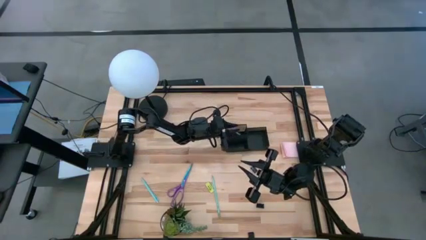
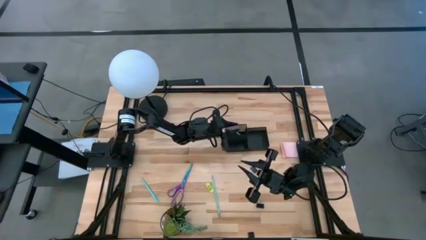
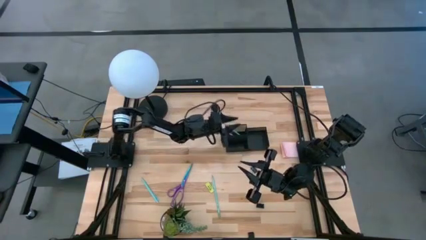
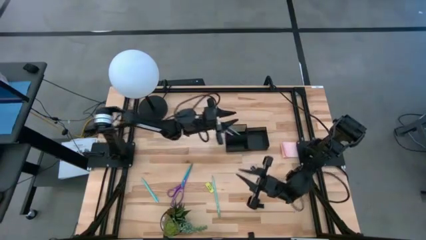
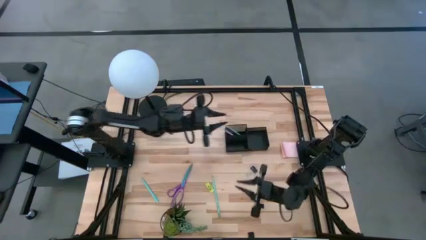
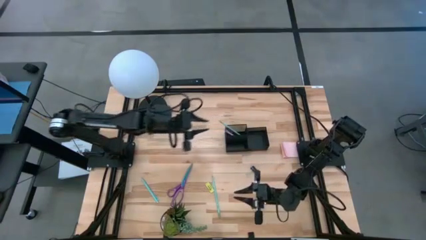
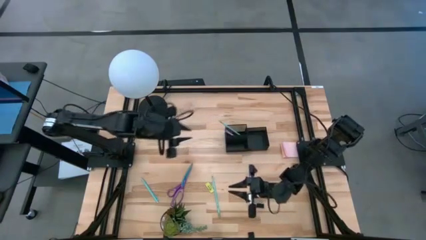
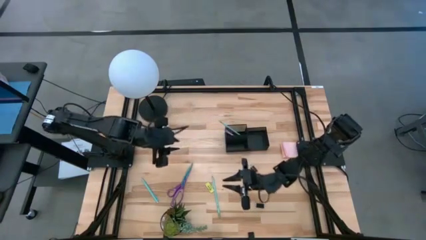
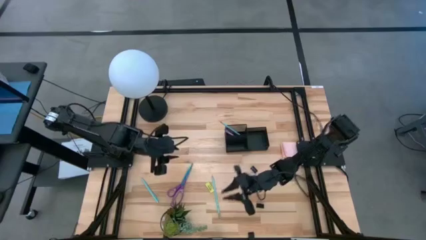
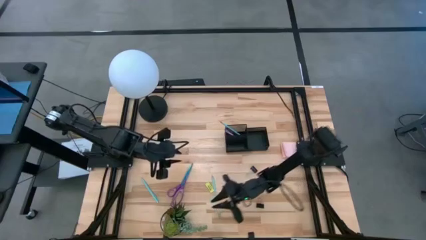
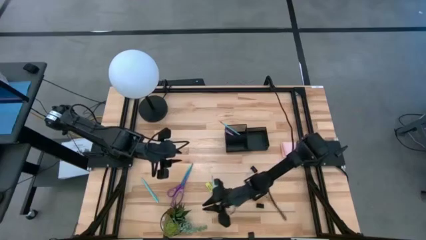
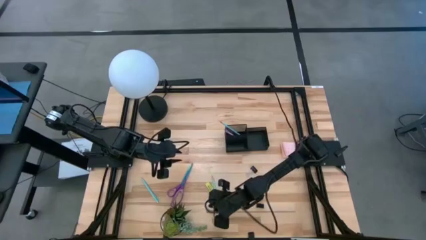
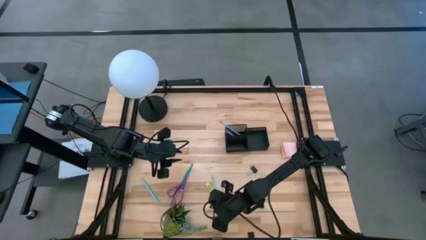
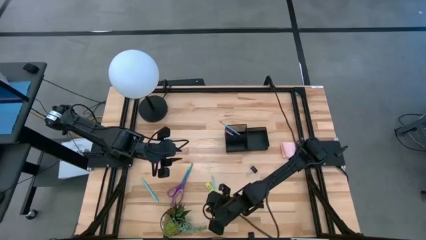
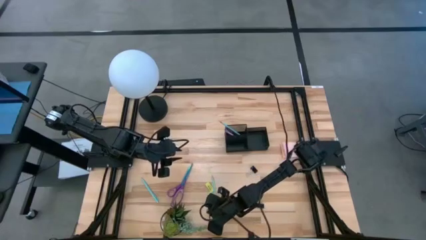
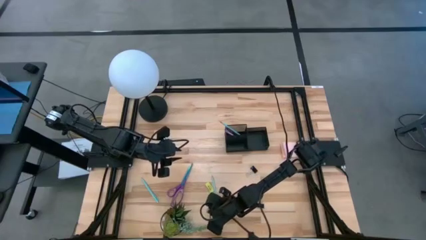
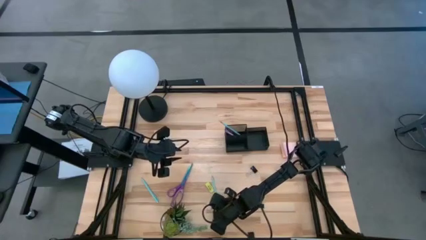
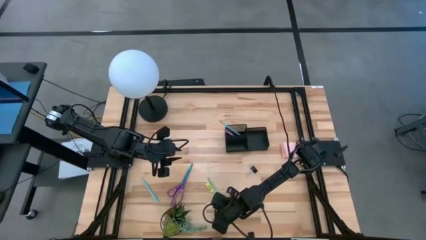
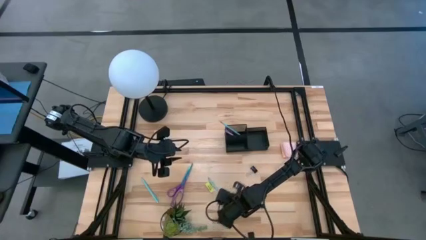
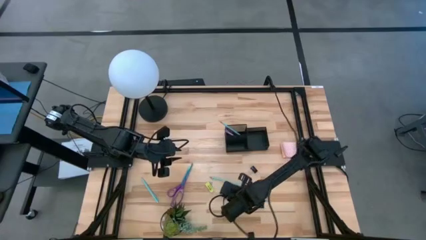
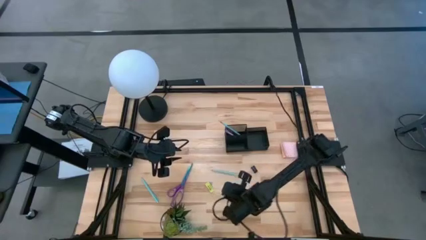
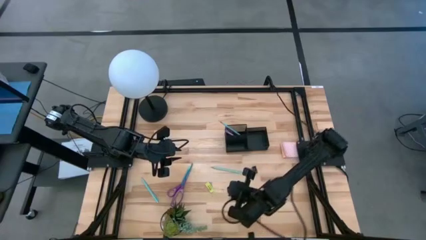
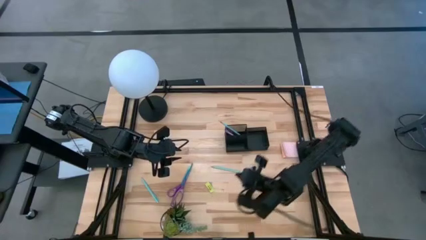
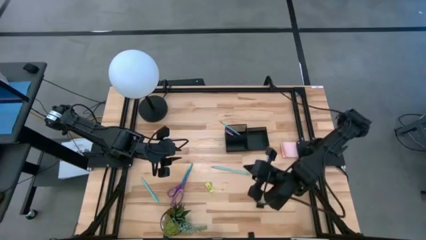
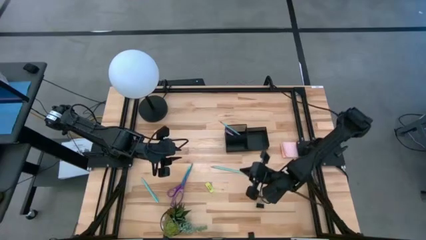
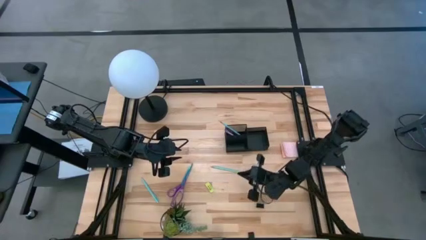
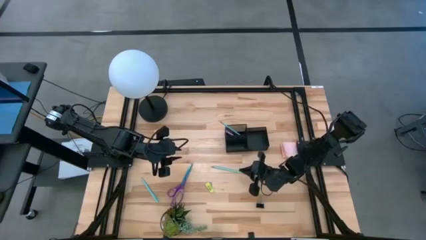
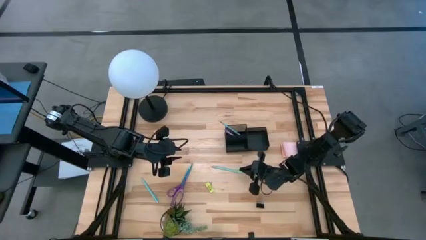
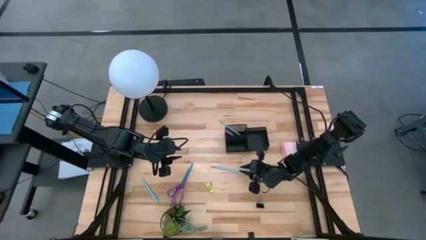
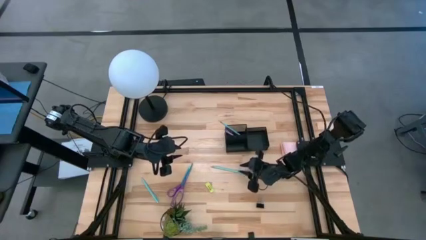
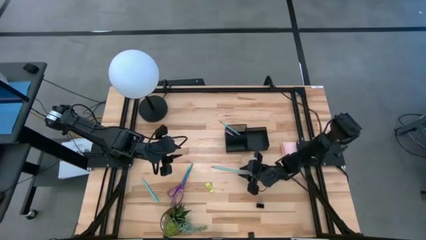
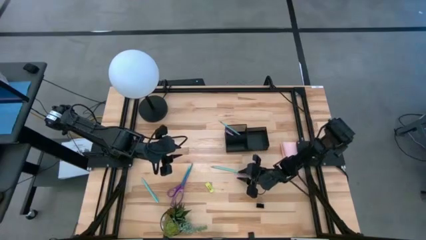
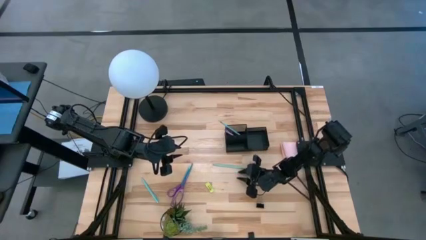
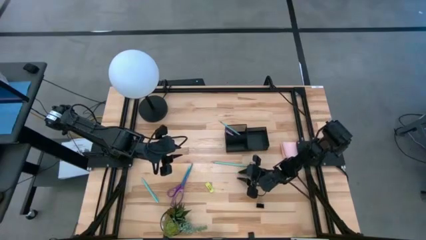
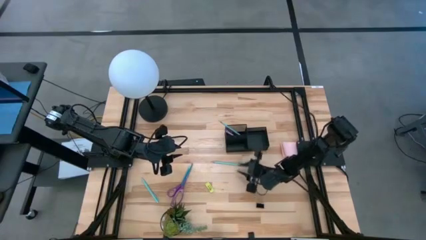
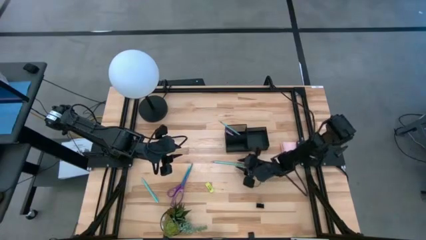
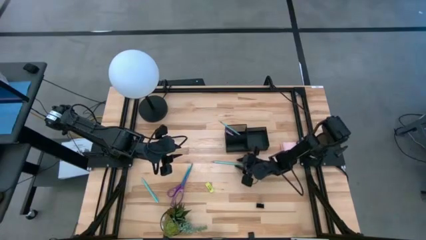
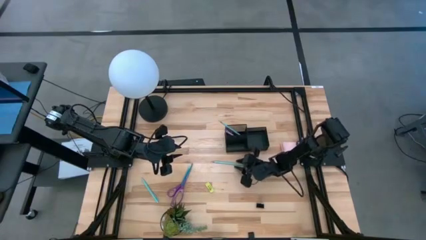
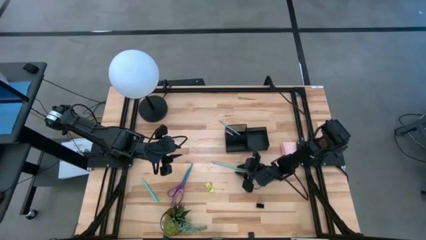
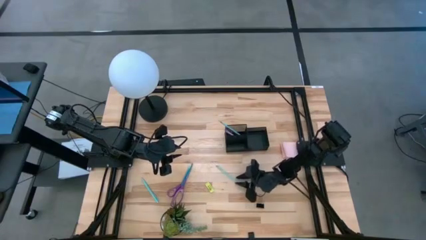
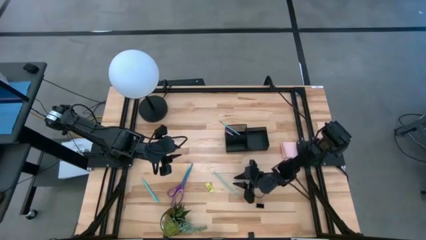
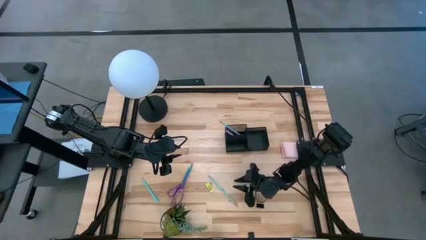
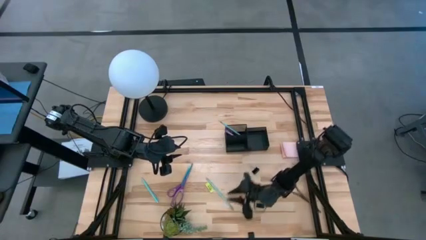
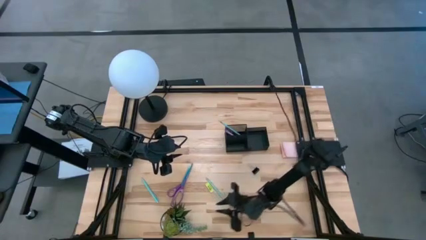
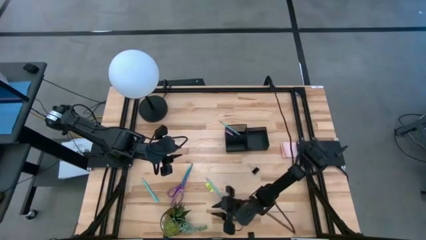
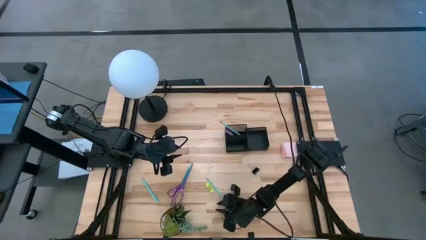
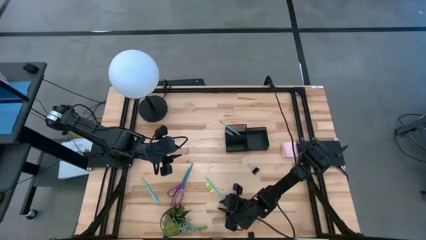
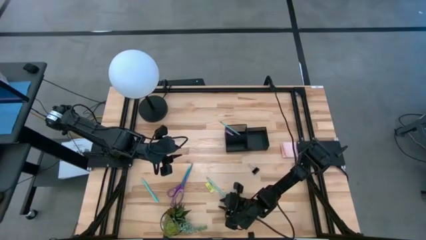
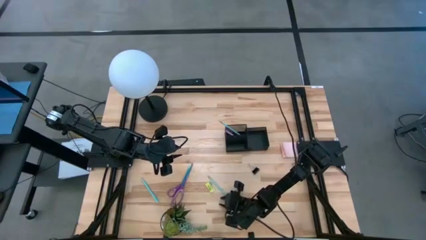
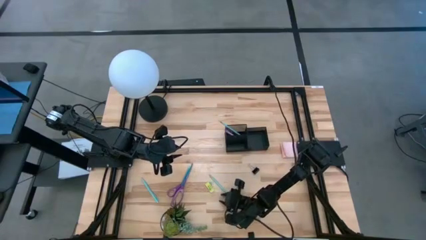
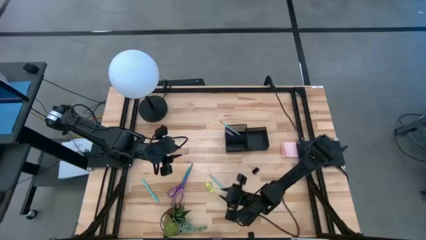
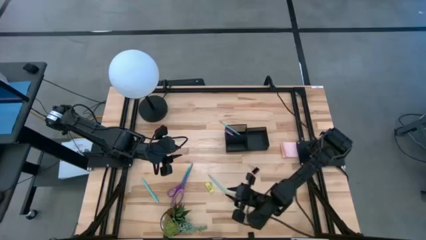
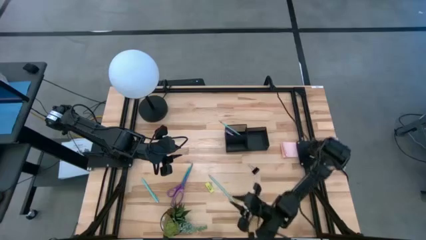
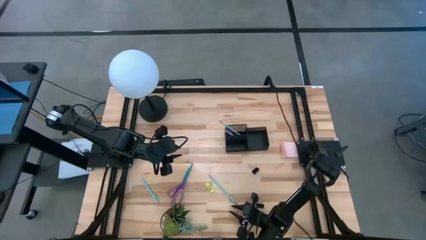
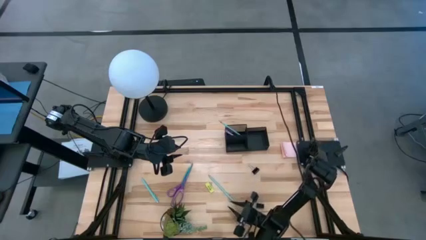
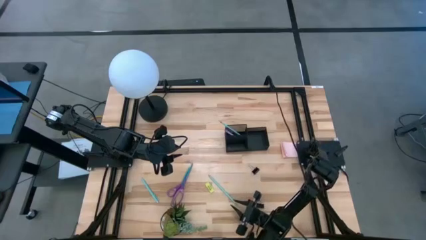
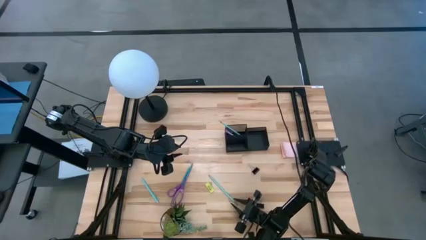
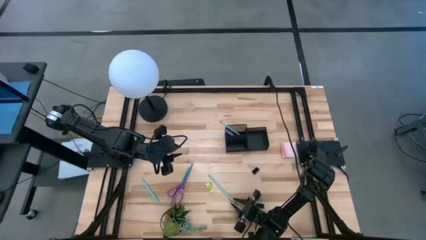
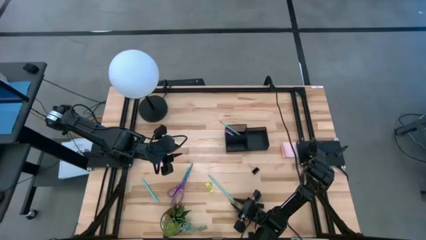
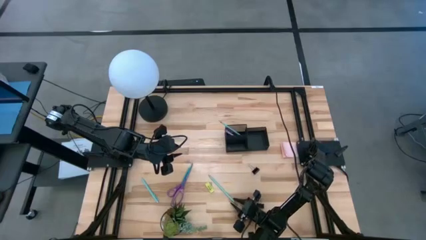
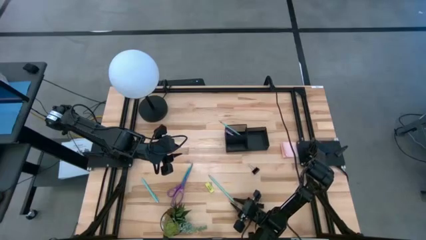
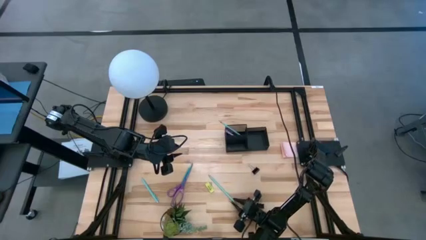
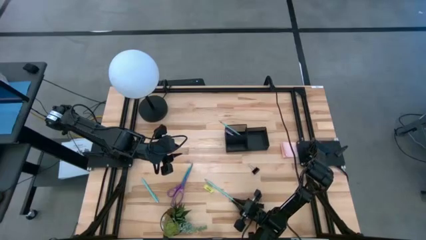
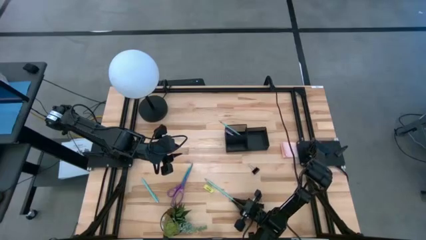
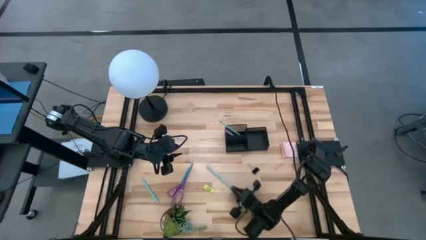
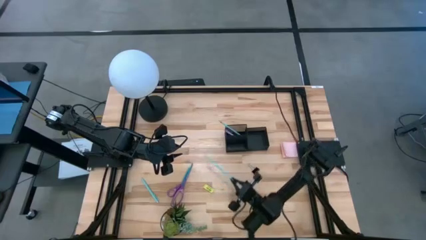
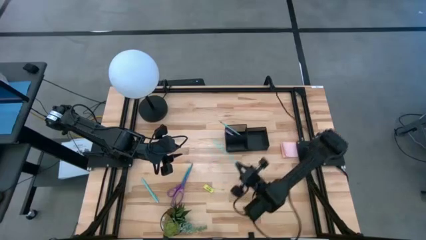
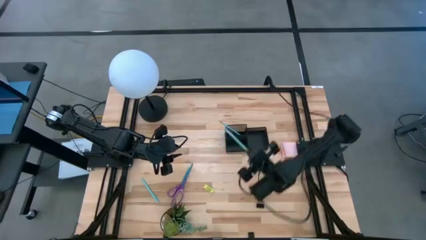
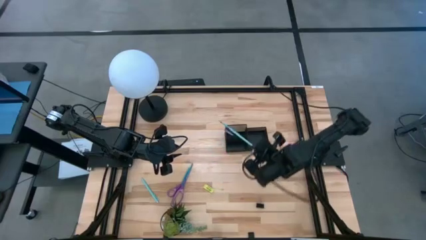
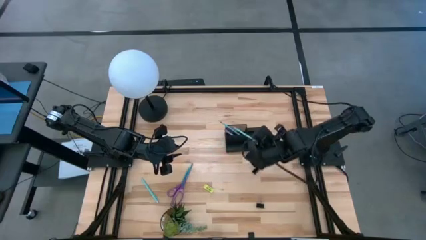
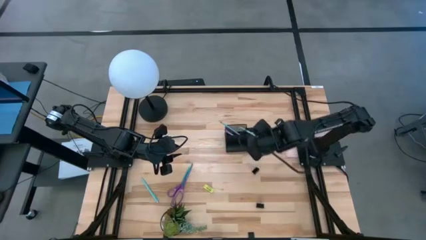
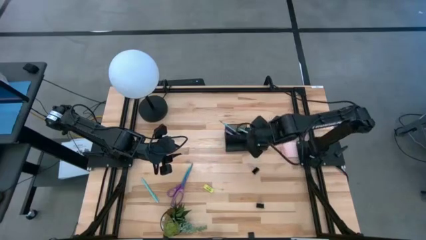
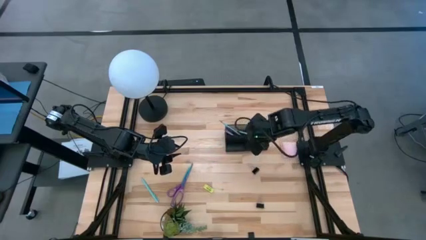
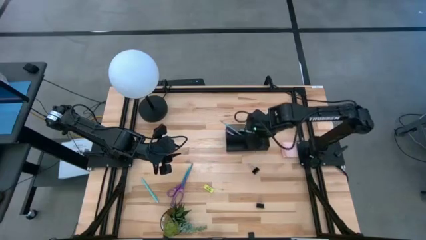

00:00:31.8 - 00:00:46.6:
Task: Pick and place office supplies into organizer
Put the blue pencil into the black desk organizer
